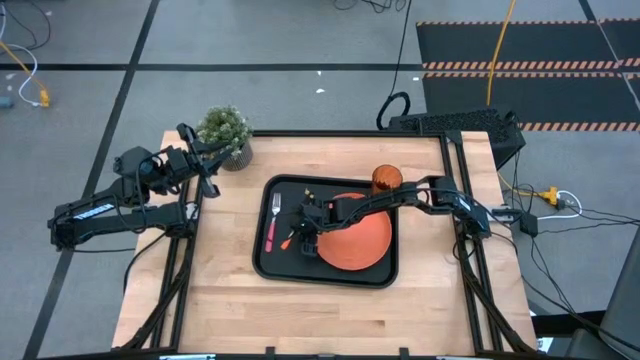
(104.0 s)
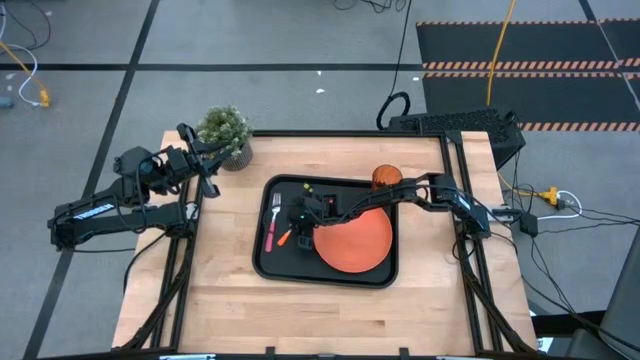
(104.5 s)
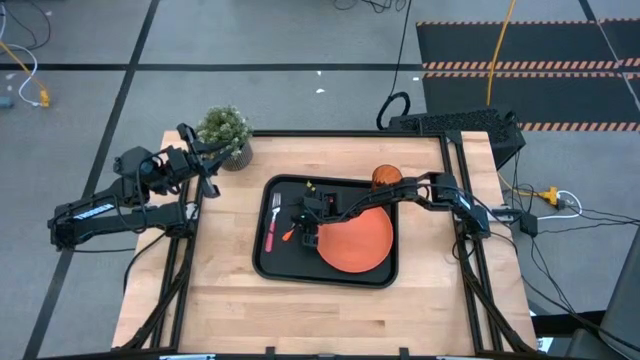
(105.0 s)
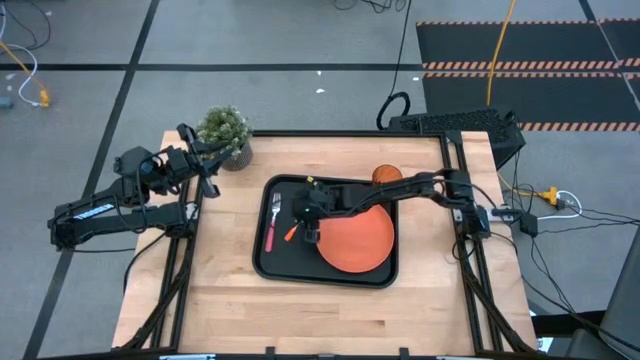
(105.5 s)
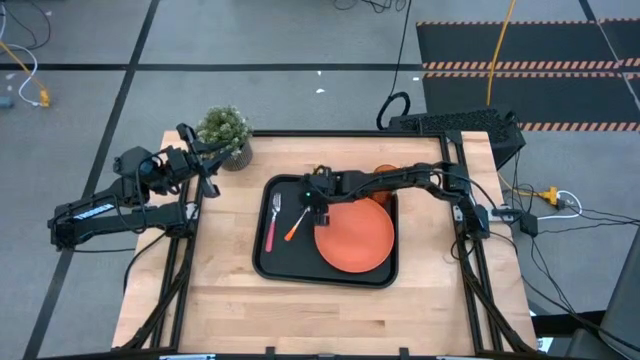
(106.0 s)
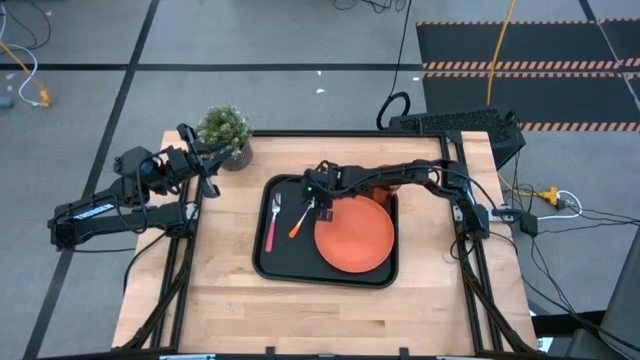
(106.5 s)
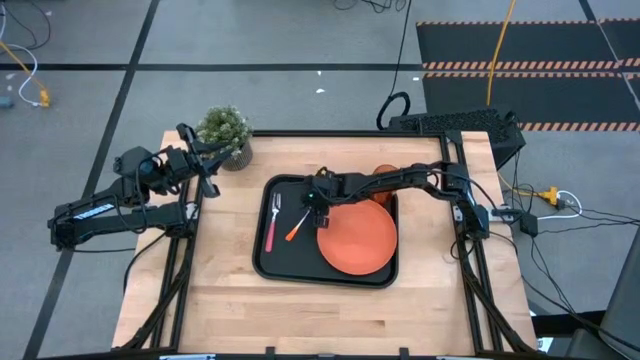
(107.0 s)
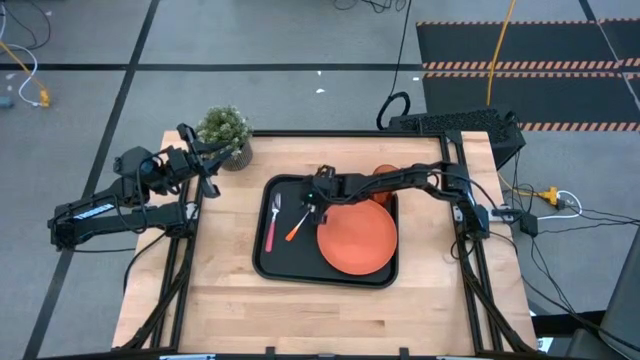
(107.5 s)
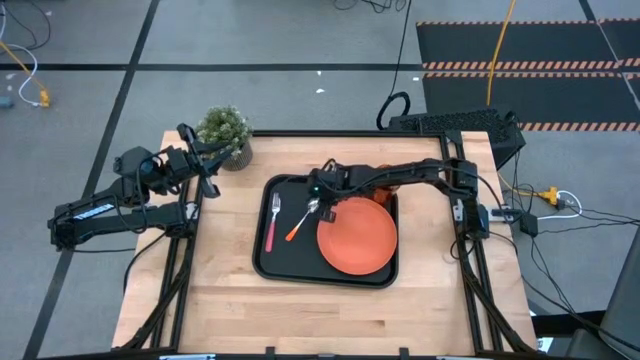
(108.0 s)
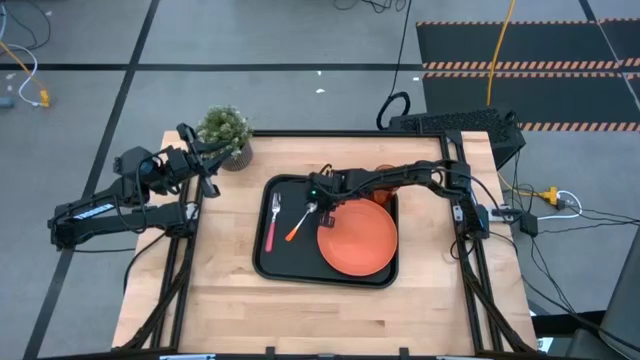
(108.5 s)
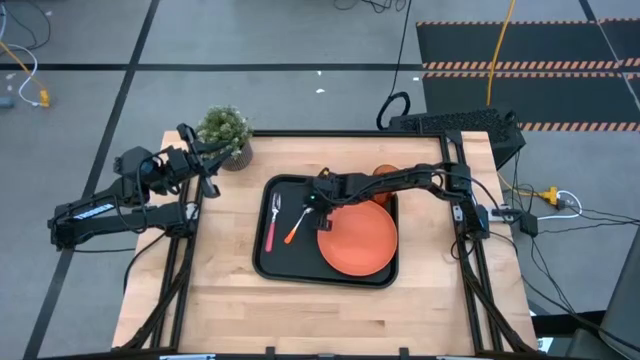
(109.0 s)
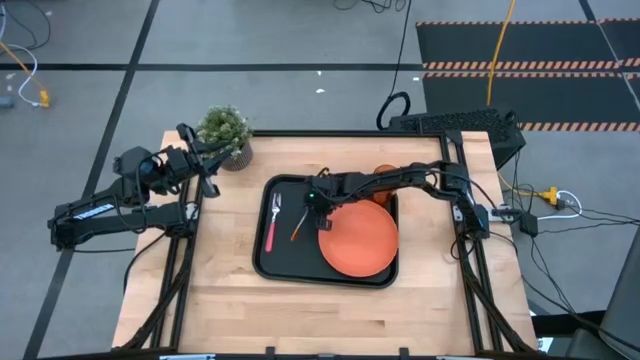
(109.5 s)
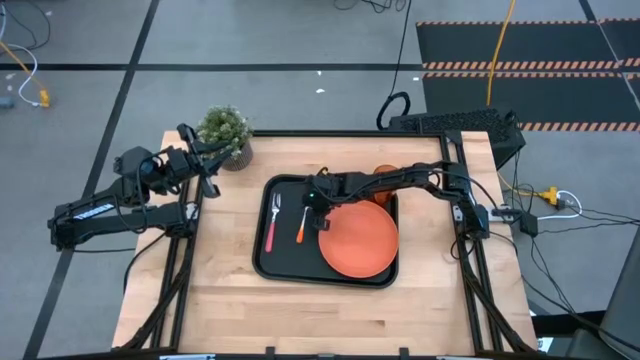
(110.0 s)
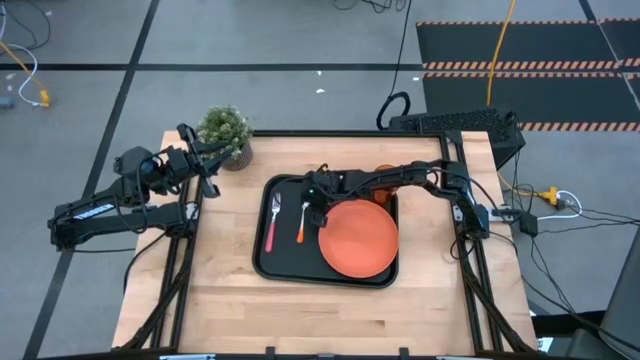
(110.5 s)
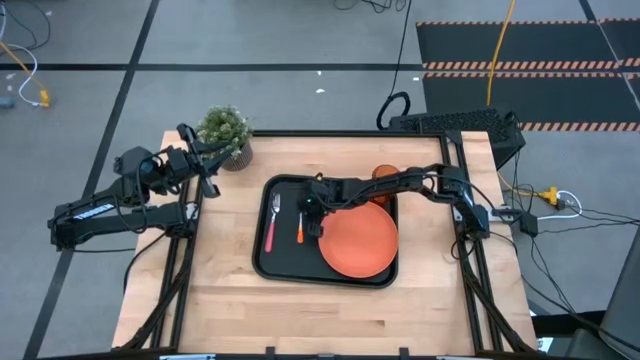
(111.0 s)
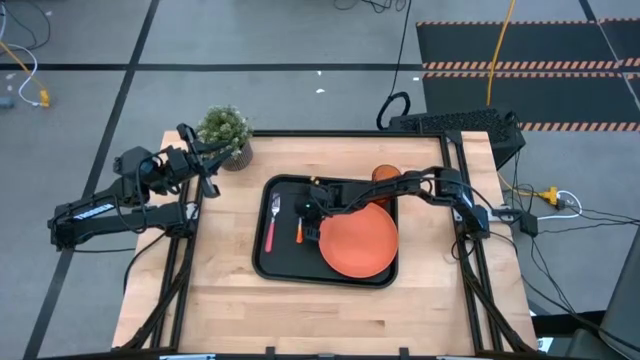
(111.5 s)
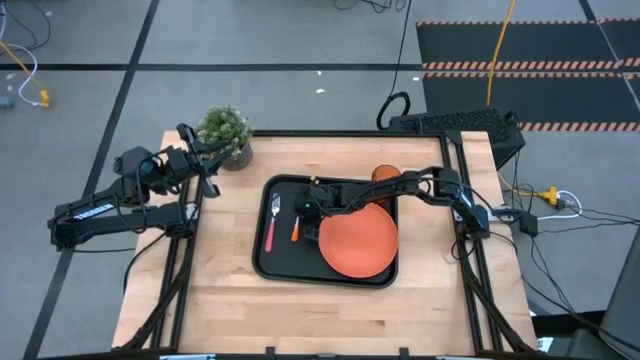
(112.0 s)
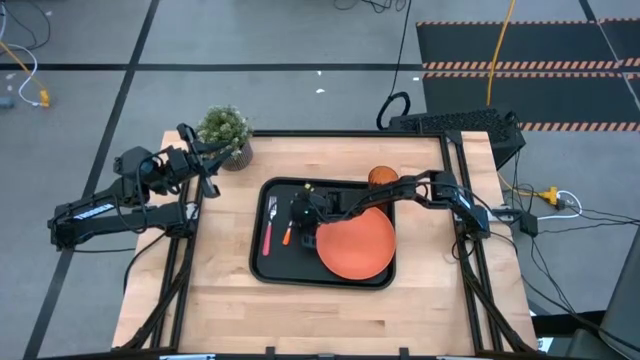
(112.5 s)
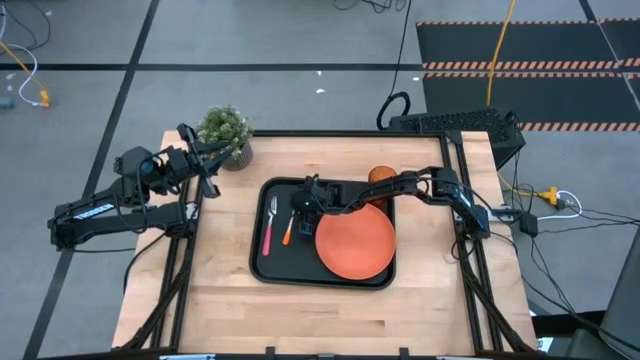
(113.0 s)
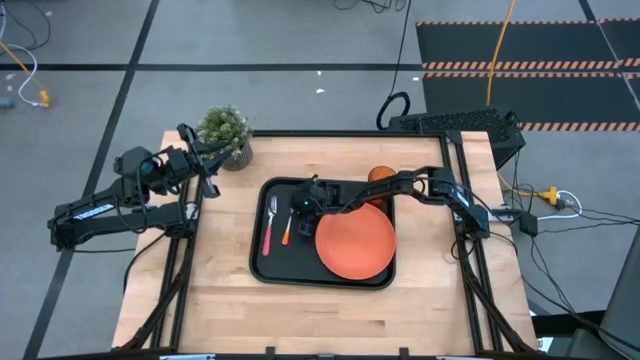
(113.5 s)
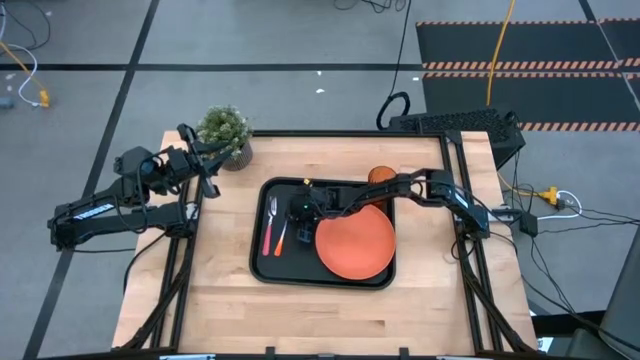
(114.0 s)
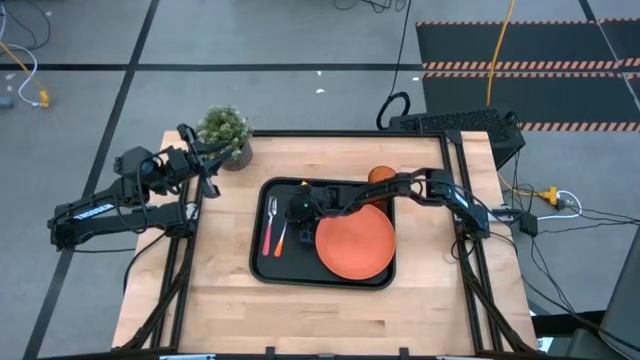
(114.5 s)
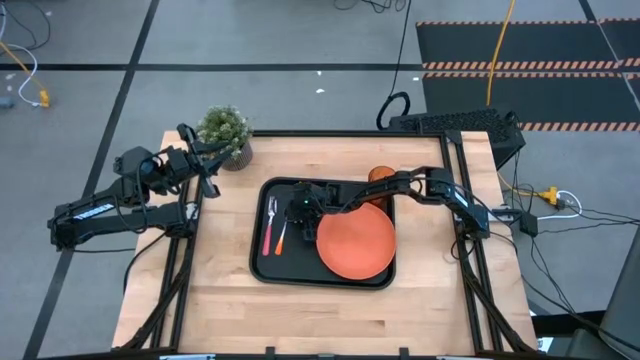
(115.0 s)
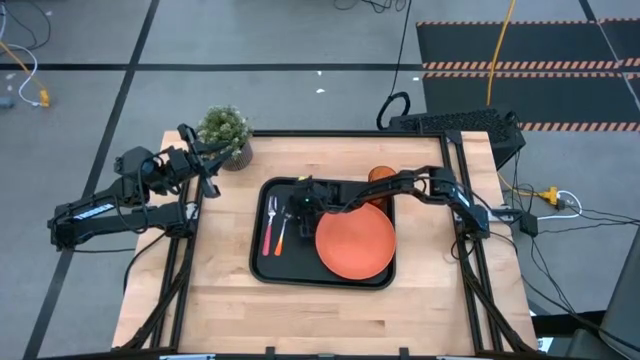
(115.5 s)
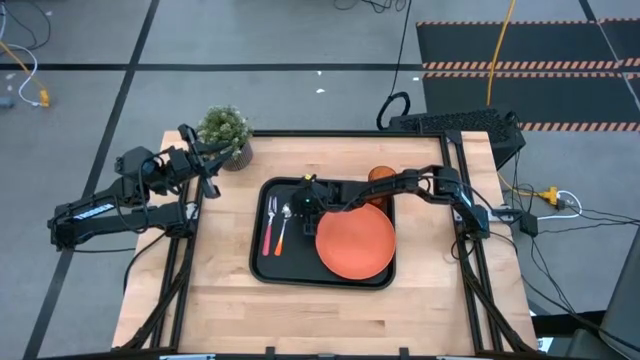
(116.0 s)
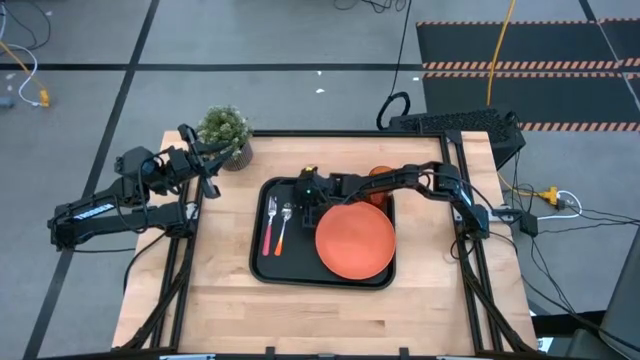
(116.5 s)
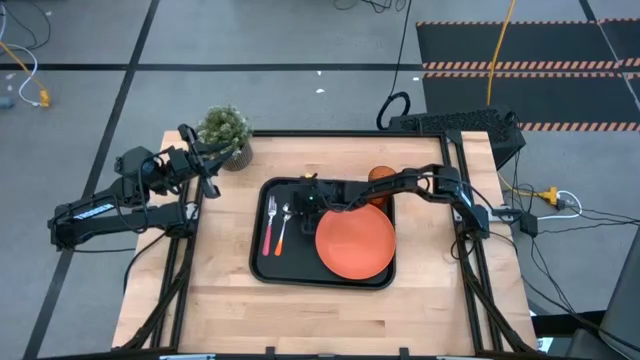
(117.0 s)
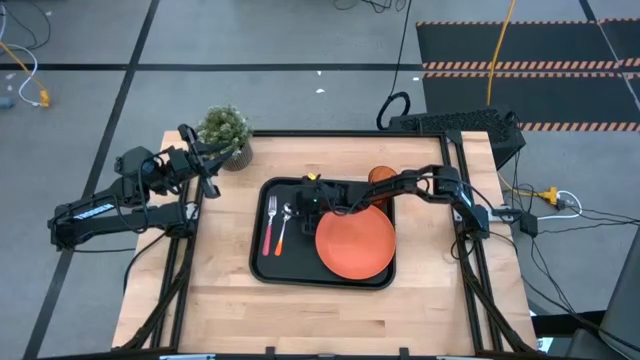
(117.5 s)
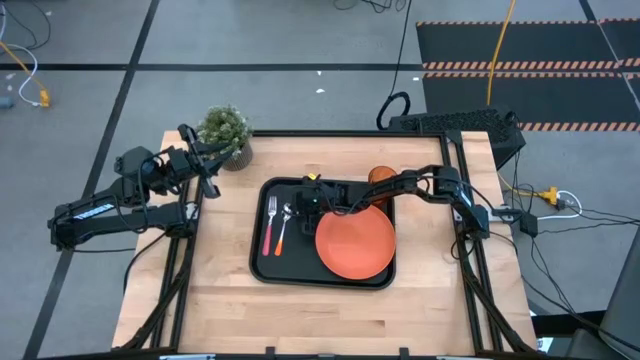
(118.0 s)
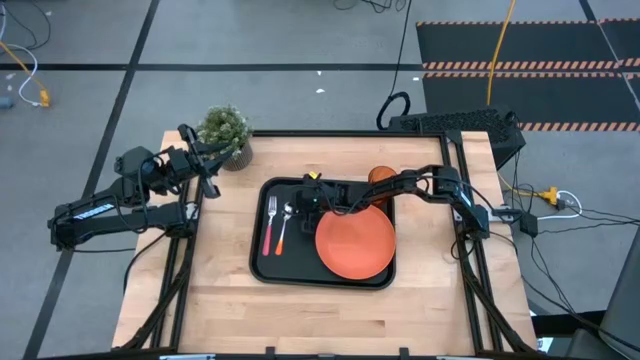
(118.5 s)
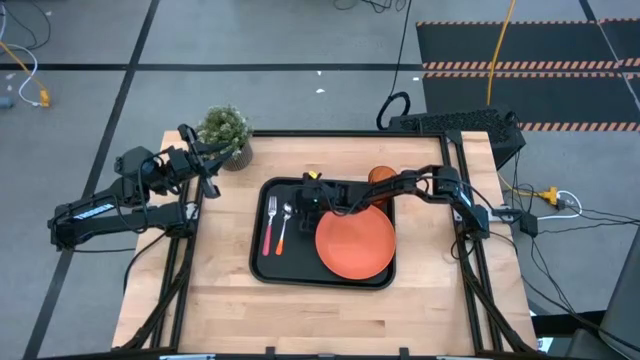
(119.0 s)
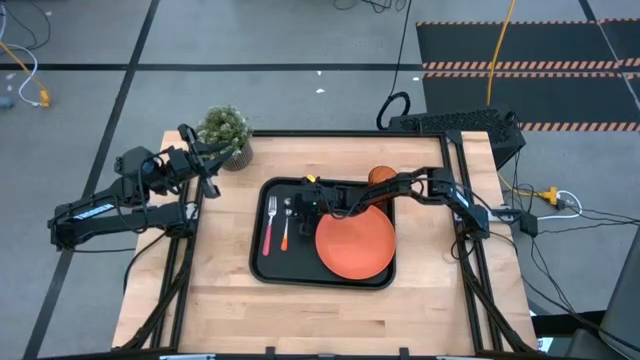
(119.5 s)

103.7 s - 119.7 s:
Task: Pick and place plate/cup/fork/spoon on tray
Adjust the orange spoon on the black tray

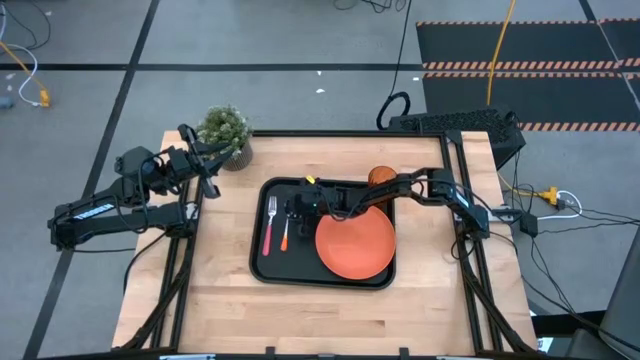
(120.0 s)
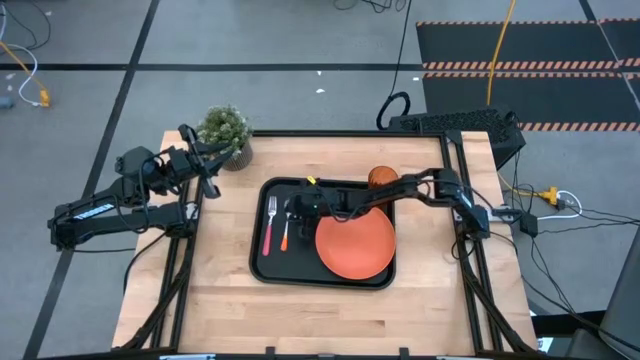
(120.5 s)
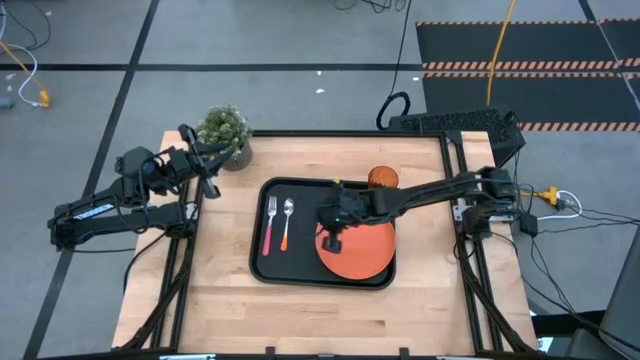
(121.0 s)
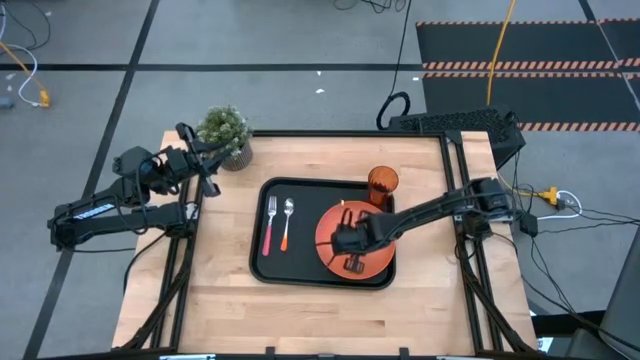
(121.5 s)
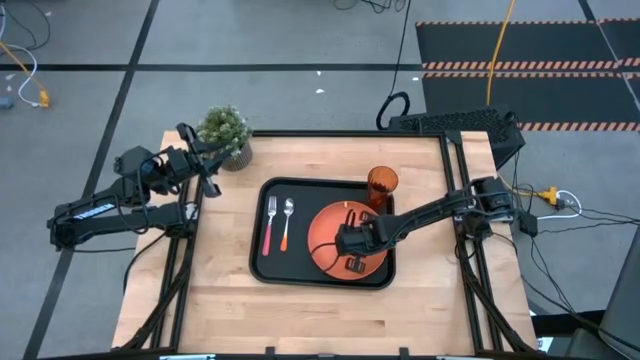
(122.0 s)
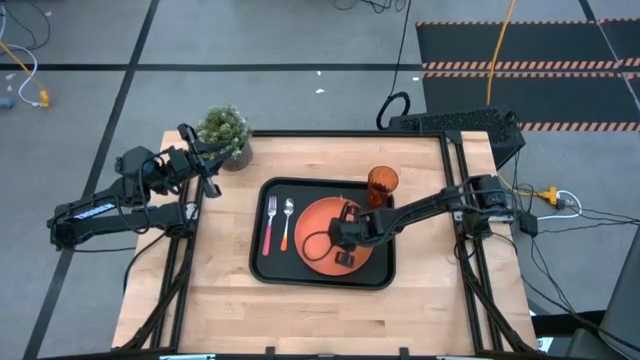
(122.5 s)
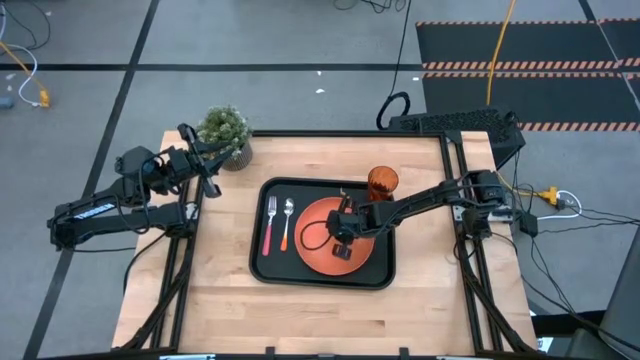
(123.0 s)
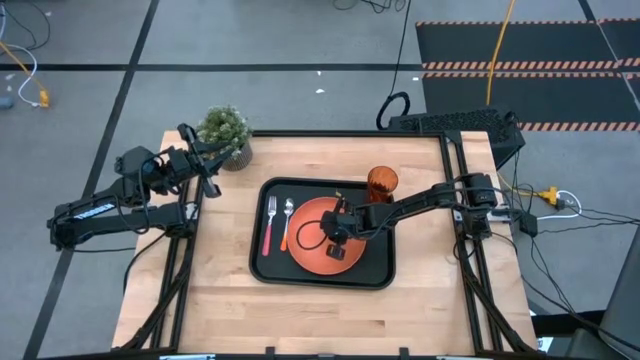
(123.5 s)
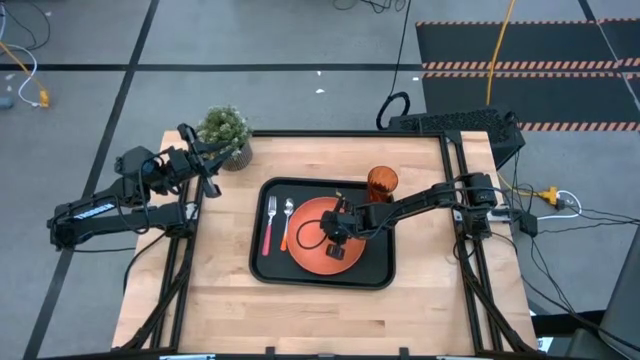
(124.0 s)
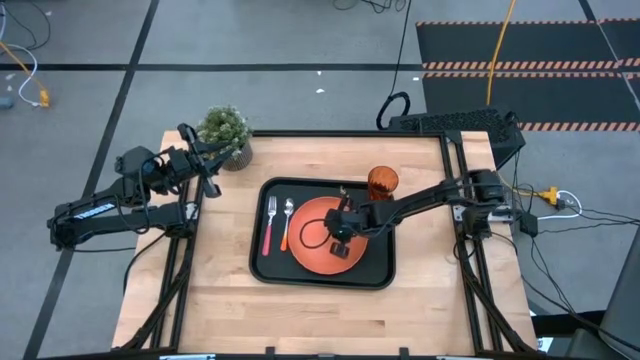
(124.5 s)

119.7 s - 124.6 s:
Adjust the orange plate on the black tray
